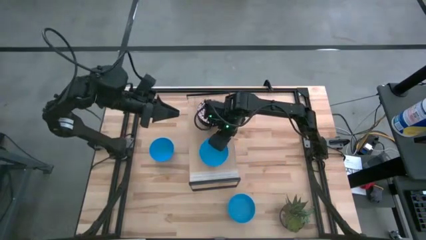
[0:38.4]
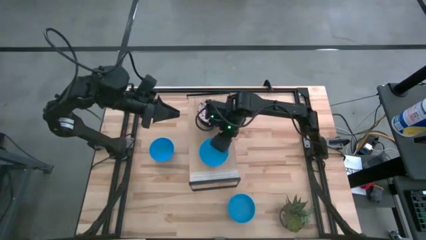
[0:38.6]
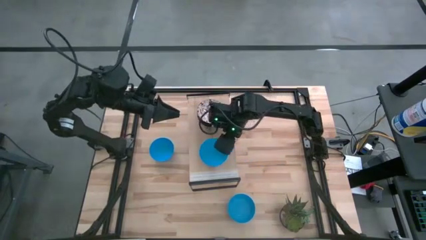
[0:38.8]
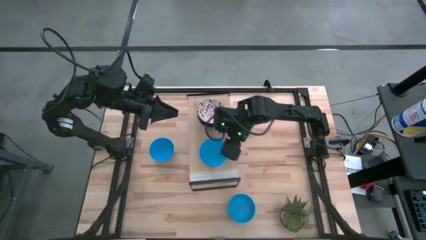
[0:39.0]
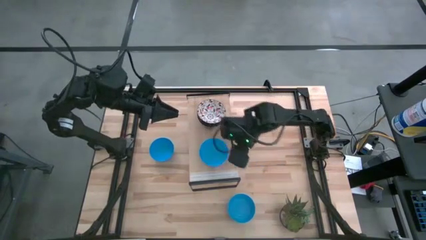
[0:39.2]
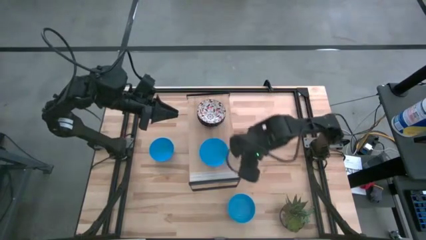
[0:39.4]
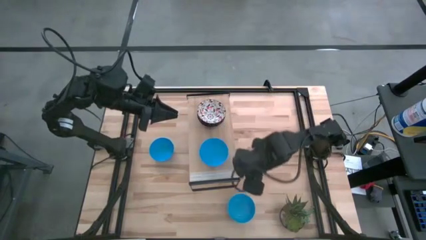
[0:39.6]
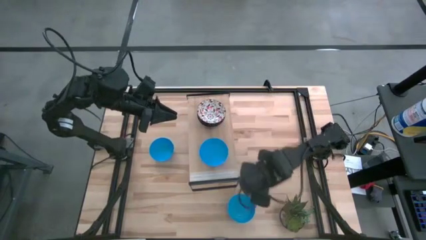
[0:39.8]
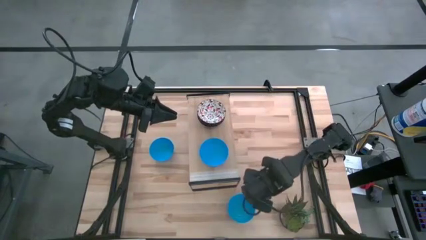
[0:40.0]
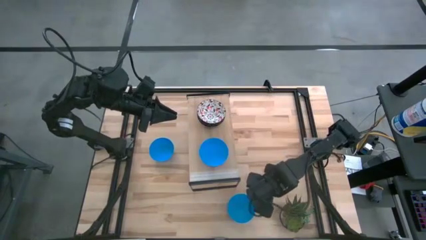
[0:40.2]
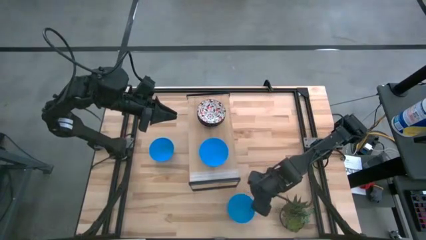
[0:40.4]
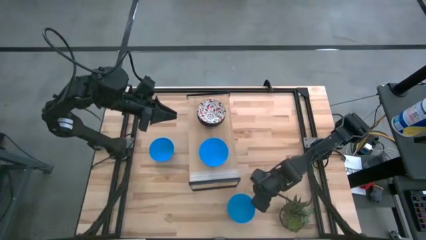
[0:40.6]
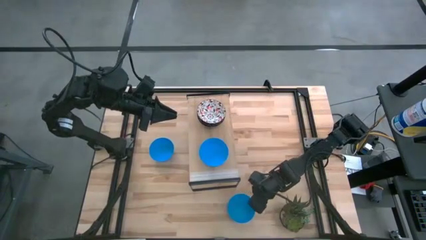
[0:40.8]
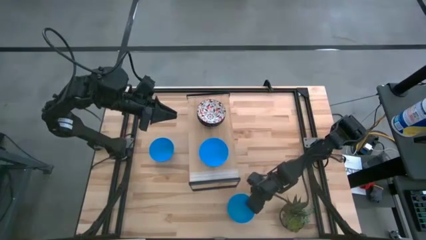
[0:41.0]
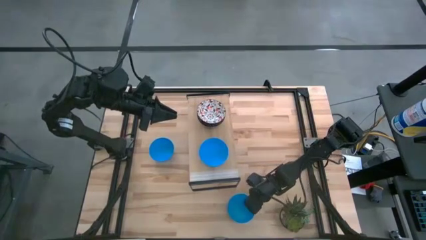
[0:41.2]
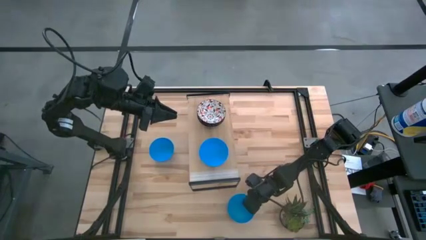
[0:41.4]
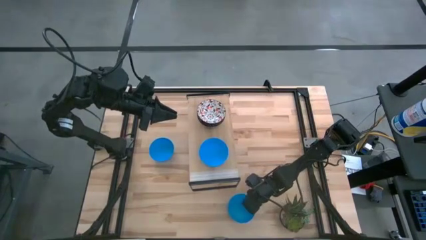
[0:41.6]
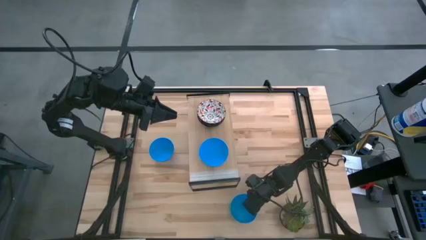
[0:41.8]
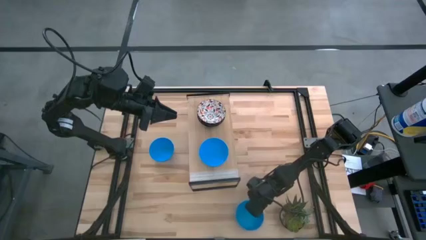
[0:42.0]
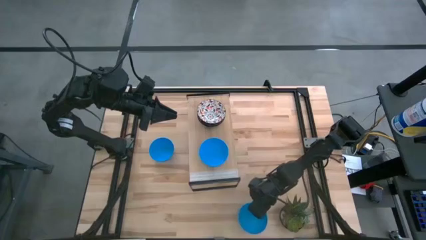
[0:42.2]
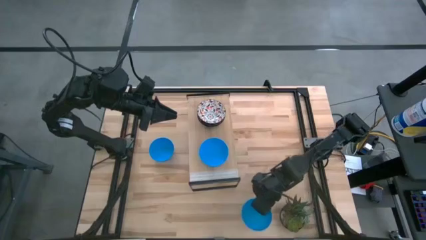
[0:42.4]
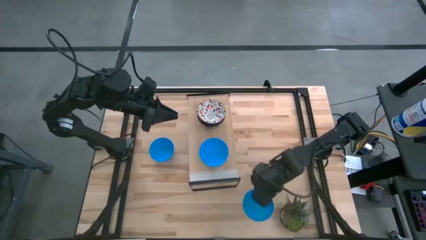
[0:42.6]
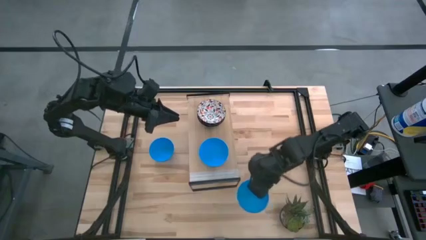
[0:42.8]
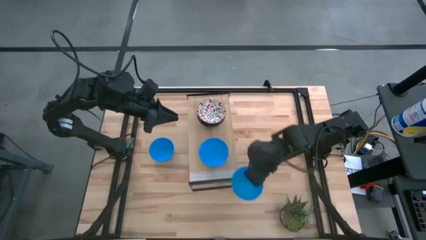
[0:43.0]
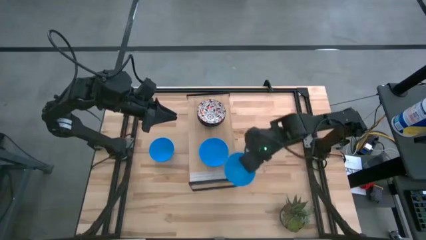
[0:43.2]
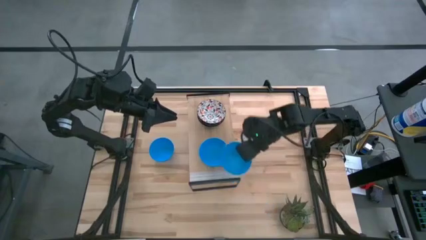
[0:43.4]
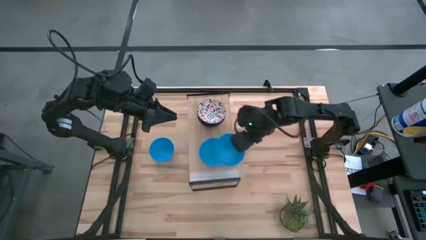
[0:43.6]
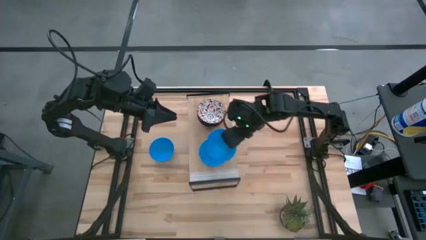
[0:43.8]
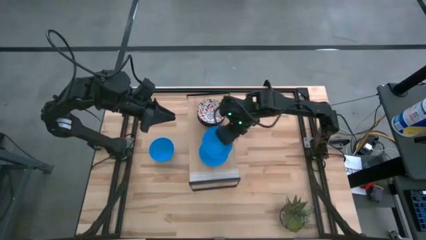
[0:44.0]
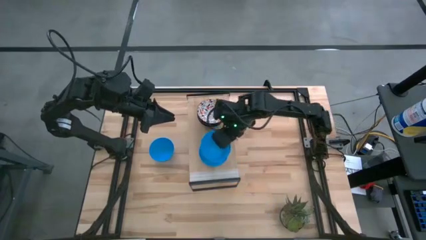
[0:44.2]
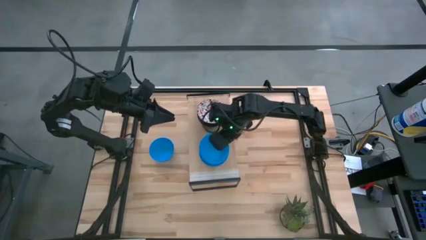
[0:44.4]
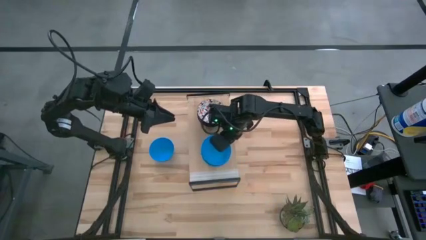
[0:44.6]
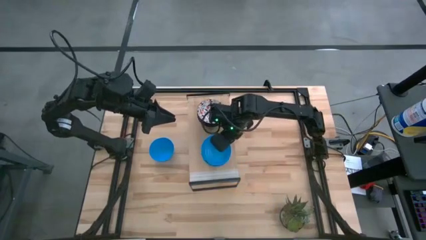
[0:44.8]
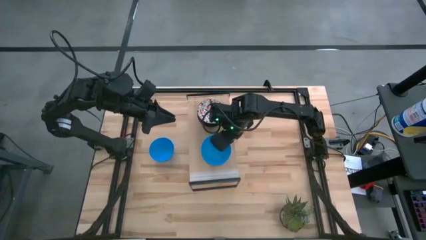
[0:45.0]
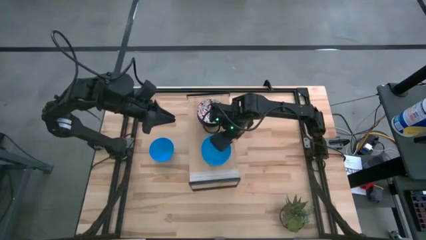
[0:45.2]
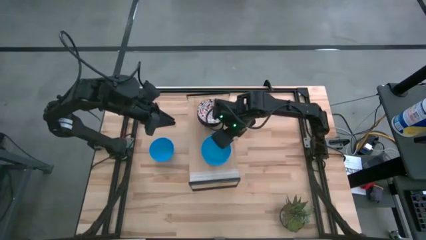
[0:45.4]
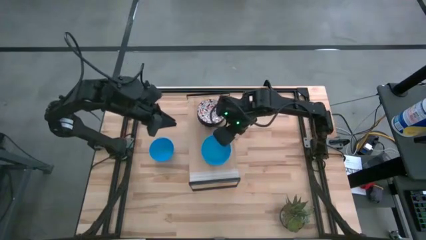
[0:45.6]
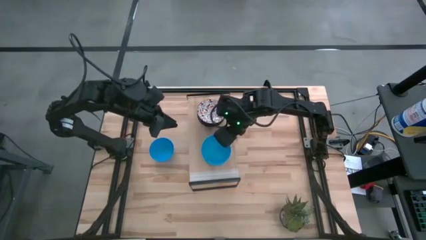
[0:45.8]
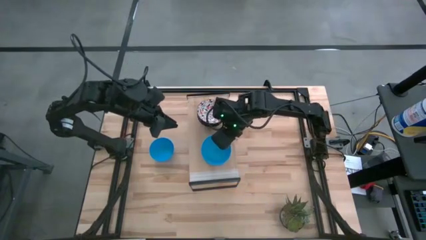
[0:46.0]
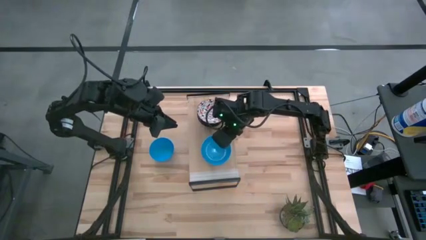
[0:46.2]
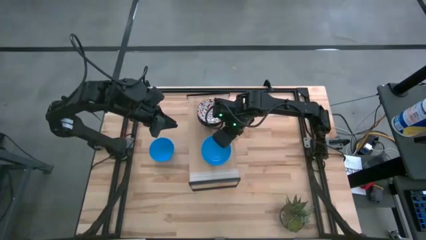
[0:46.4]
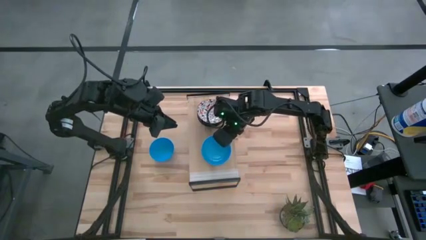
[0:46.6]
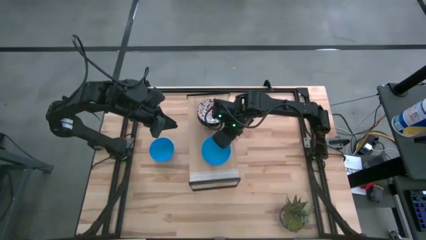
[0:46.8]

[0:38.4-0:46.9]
Task: Pick & Place Mini bowls
Stack the bottom blue bowl on top of the blue bowl on the shelf

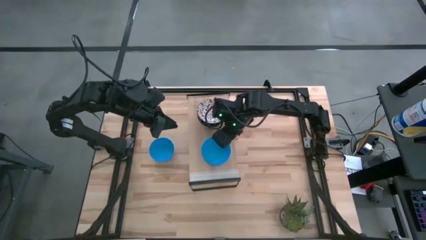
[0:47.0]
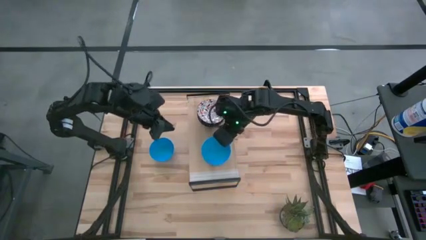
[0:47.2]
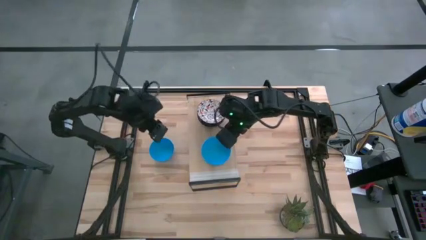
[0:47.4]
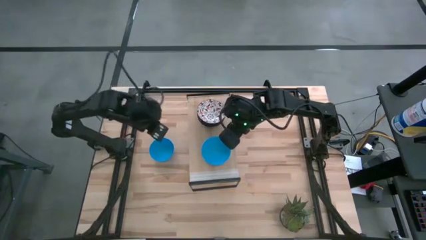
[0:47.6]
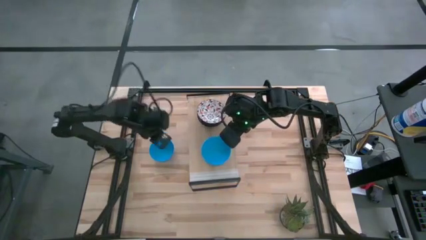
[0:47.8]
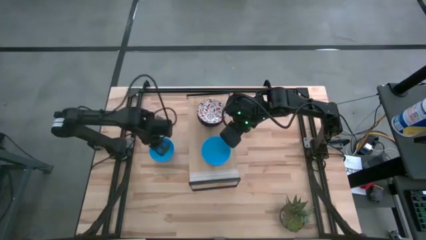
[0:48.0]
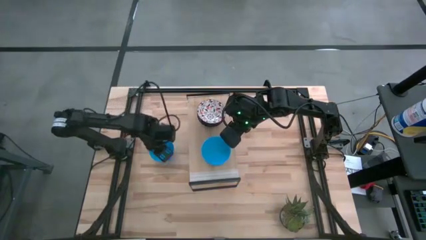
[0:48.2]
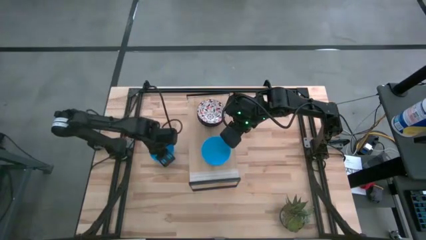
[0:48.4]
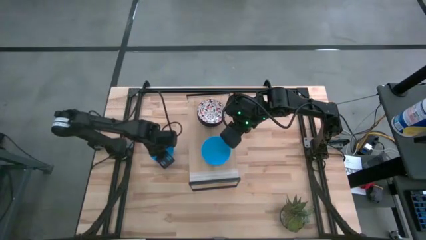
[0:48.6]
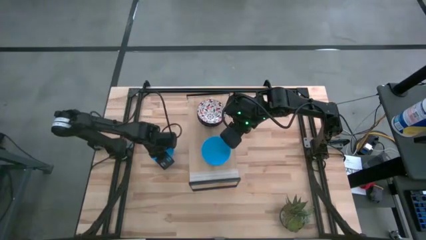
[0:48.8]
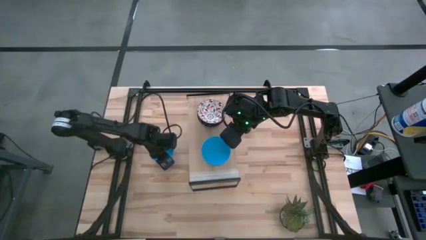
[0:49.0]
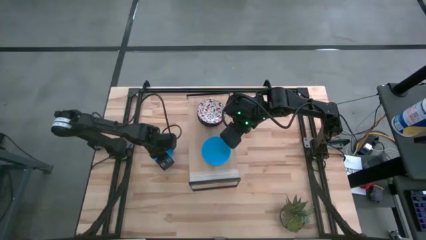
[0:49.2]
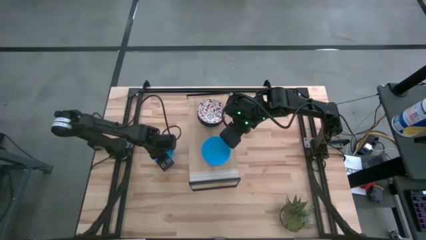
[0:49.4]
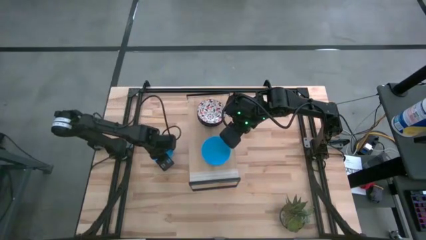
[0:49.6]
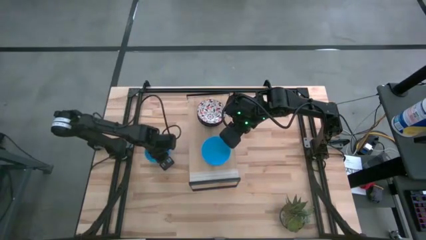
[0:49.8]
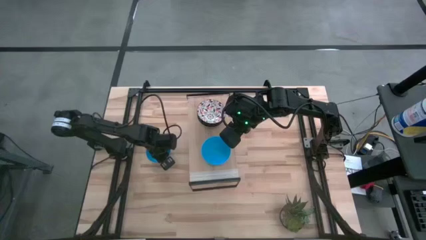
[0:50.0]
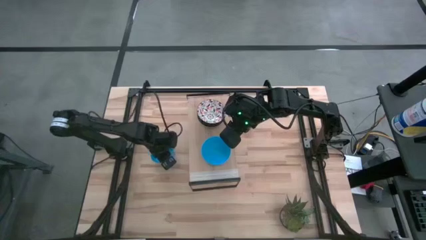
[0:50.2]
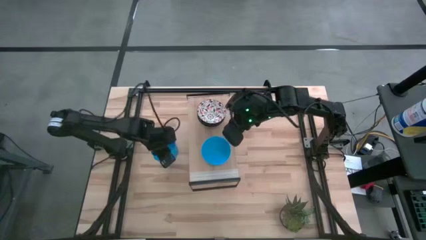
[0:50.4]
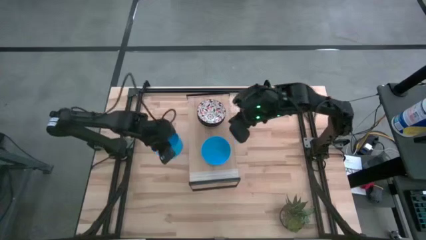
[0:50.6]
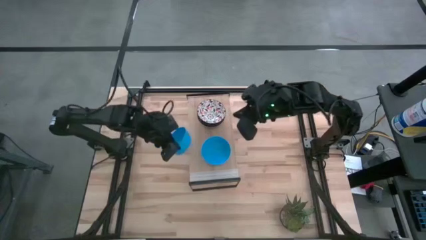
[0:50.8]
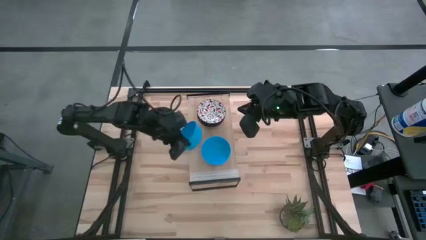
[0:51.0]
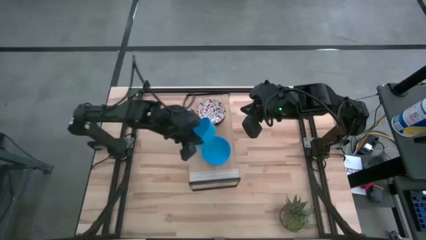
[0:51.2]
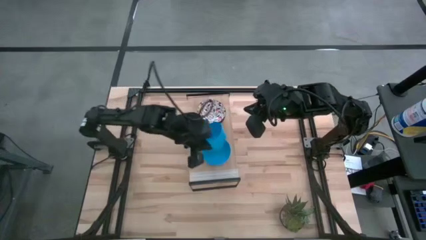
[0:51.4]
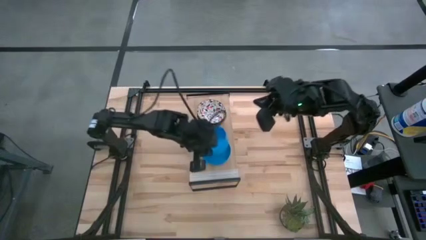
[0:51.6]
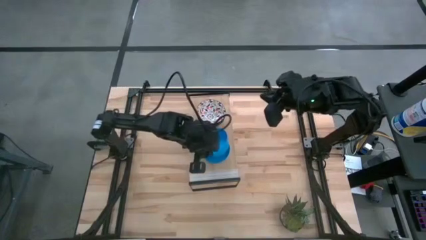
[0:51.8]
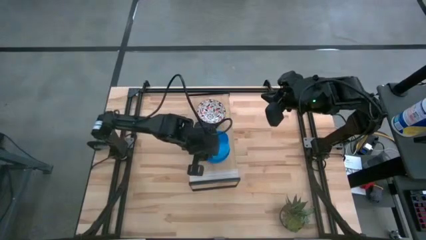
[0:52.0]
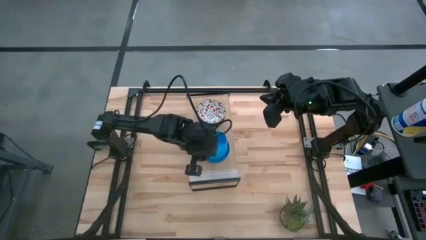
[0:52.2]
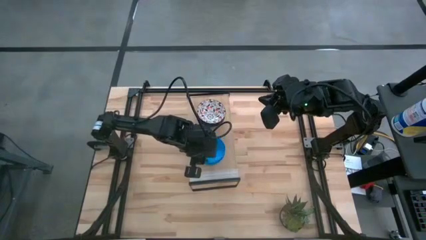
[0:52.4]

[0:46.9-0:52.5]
Stack the blue bowl on top of the stacked blue bowls on the shelf

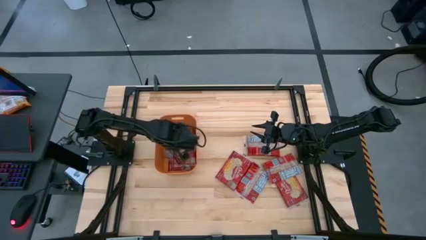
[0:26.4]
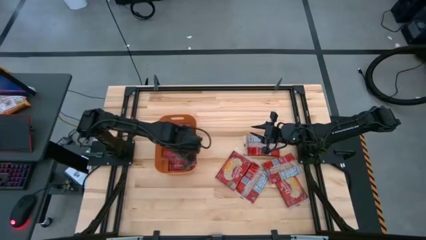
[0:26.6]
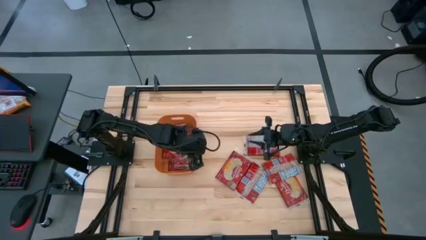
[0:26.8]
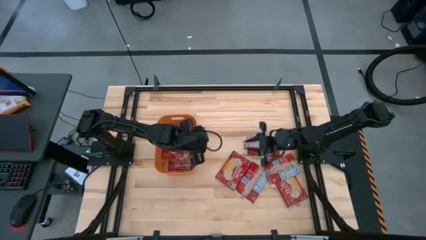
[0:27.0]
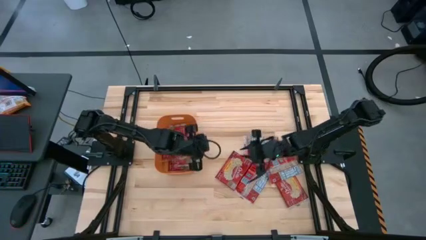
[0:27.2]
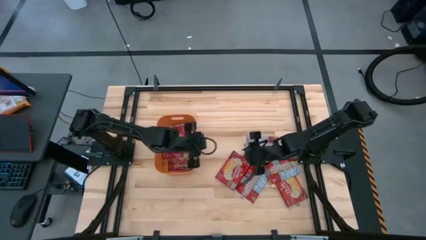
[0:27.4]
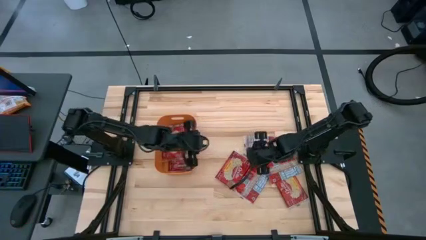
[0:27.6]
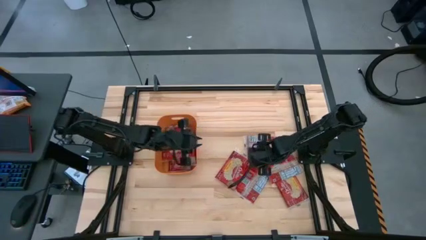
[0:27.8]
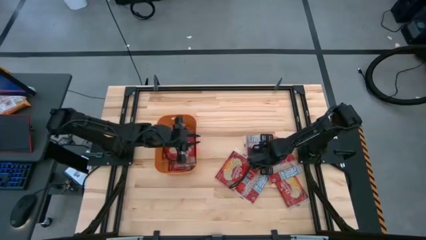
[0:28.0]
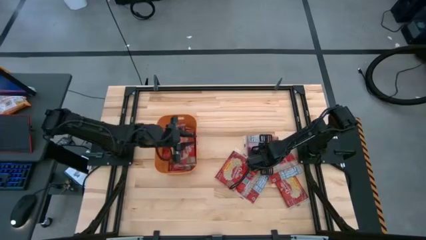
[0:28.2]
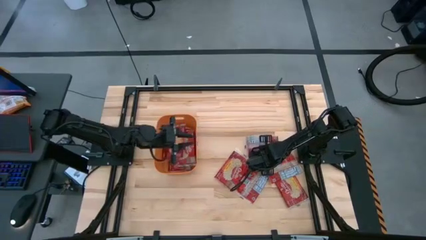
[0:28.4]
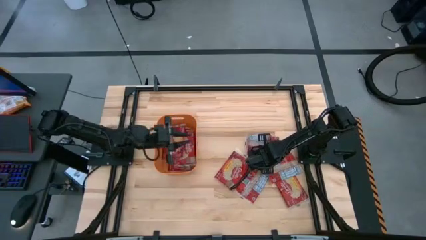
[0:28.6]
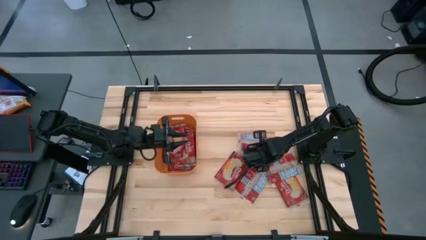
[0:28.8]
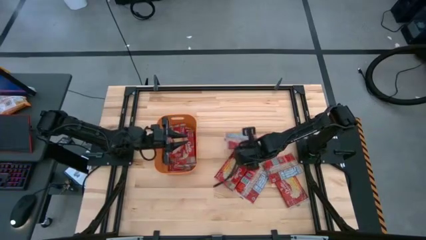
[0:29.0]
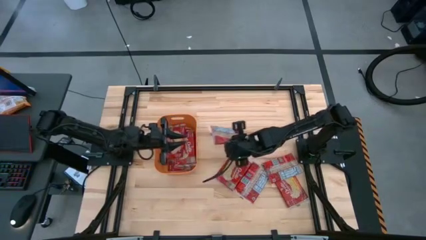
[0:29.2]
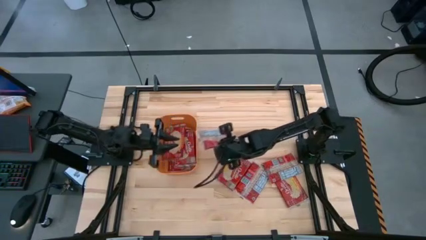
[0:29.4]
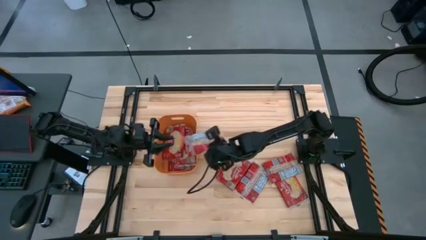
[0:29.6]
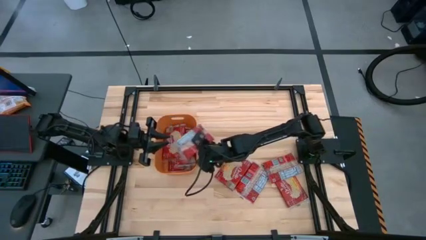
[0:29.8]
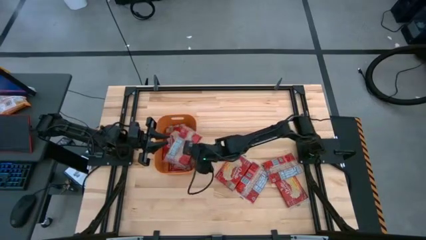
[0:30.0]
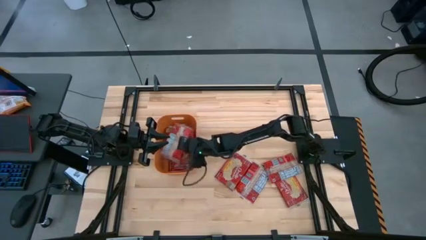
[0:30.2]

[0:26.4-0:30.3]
Task: Sort popcorn bags into baskets
Put the popcorn bag into the orange bin
